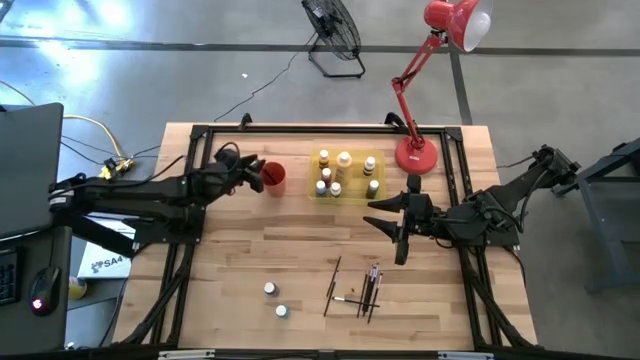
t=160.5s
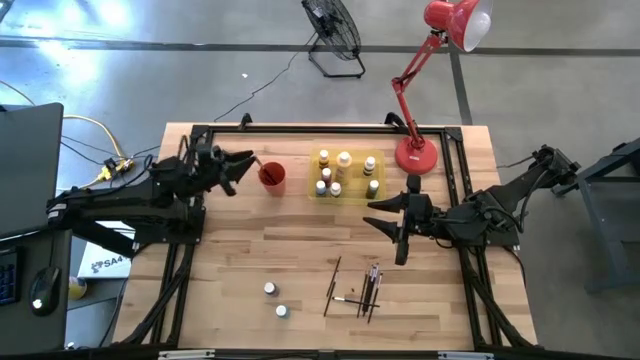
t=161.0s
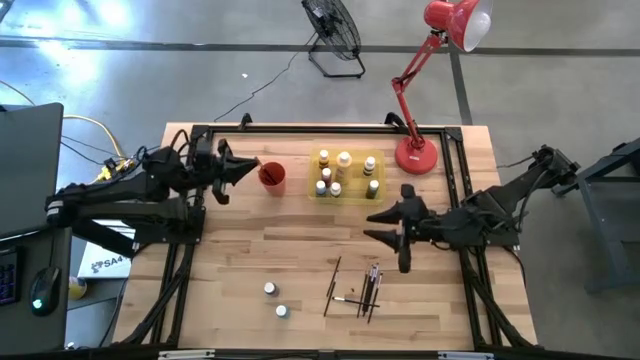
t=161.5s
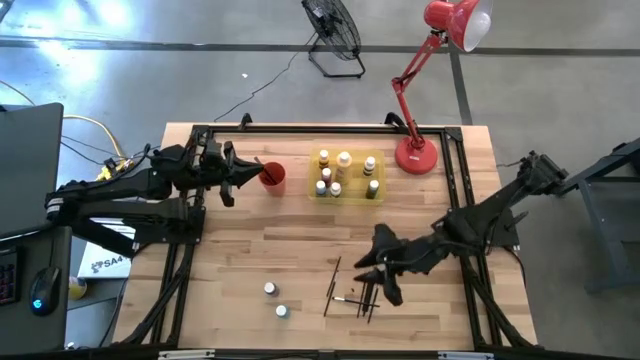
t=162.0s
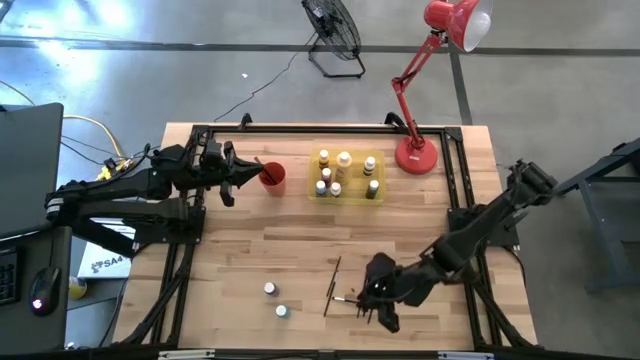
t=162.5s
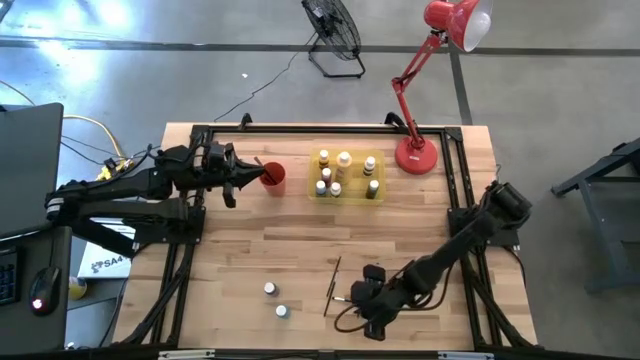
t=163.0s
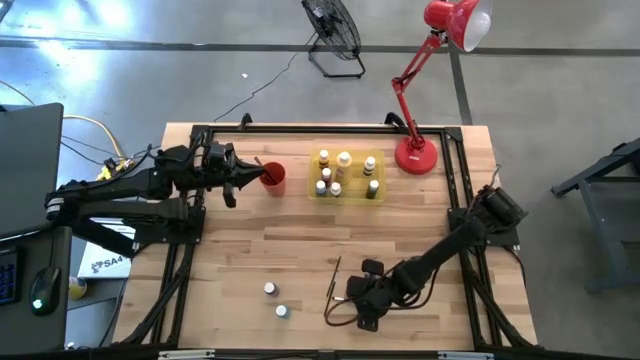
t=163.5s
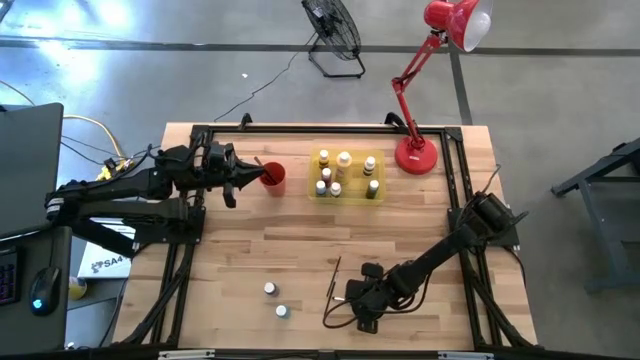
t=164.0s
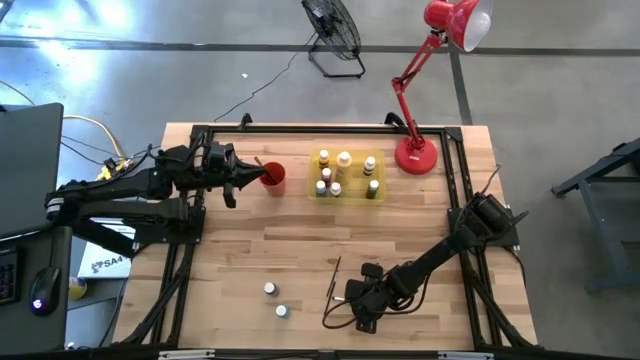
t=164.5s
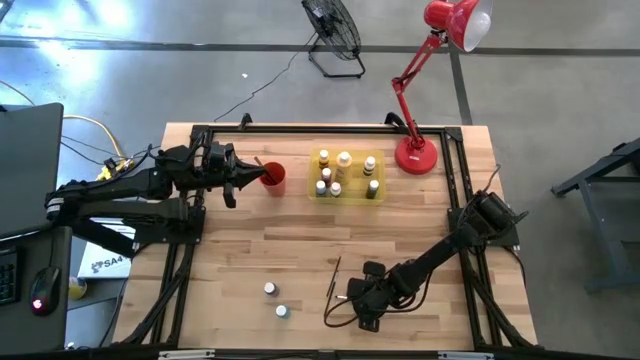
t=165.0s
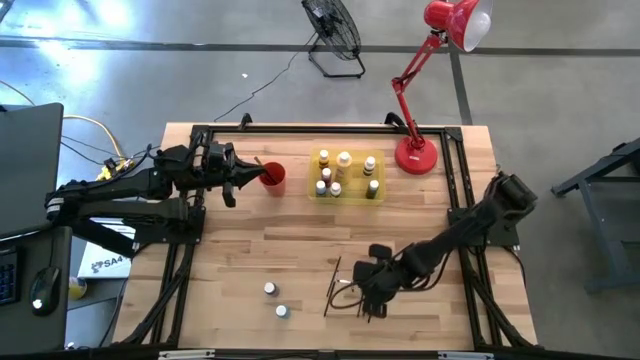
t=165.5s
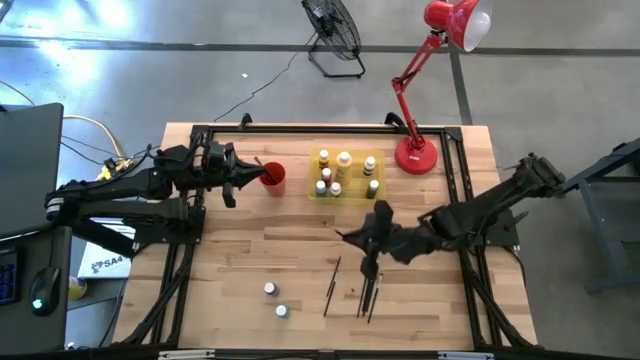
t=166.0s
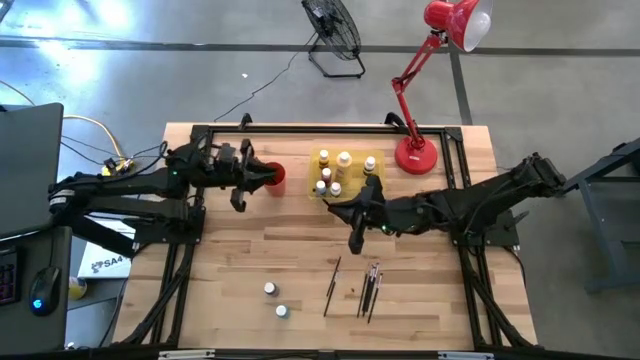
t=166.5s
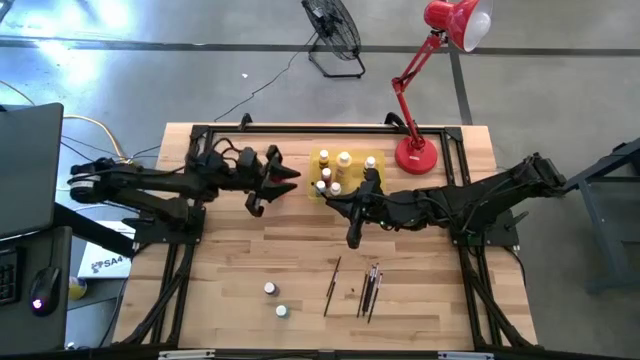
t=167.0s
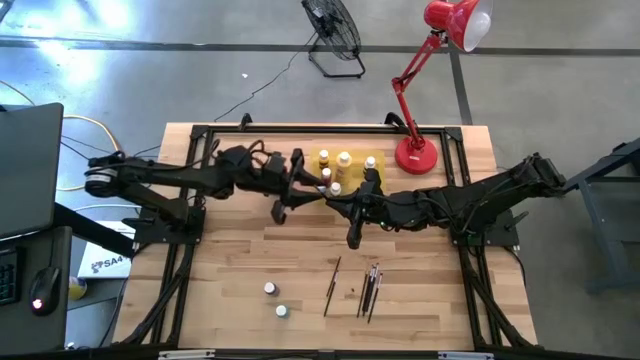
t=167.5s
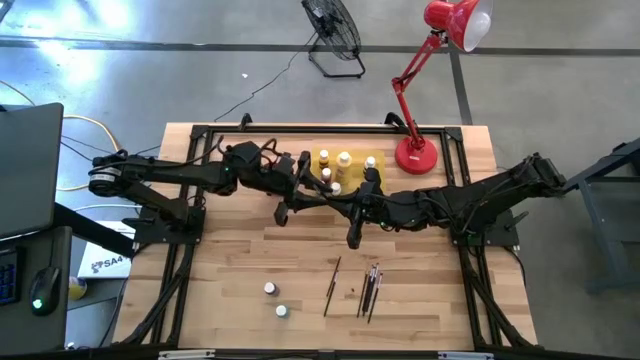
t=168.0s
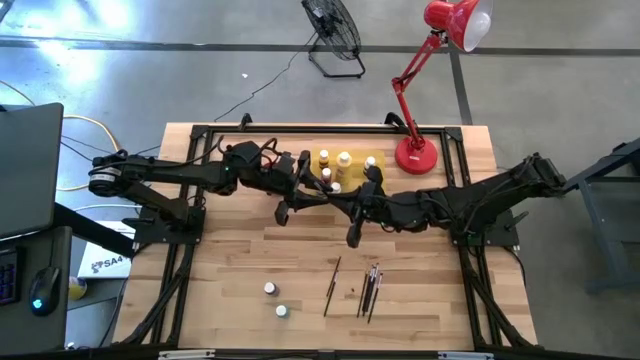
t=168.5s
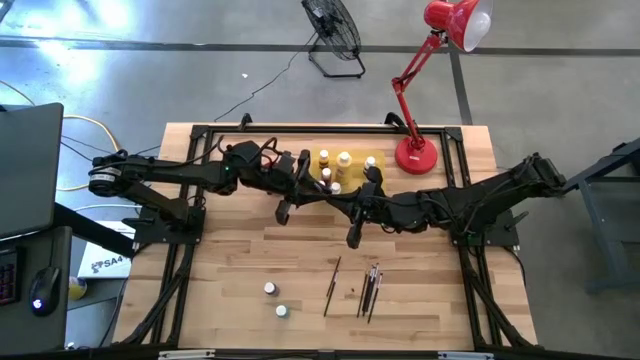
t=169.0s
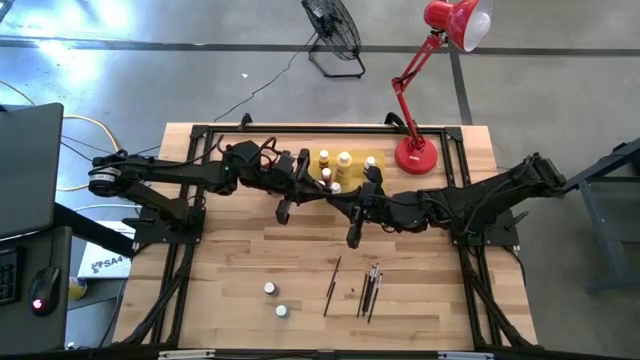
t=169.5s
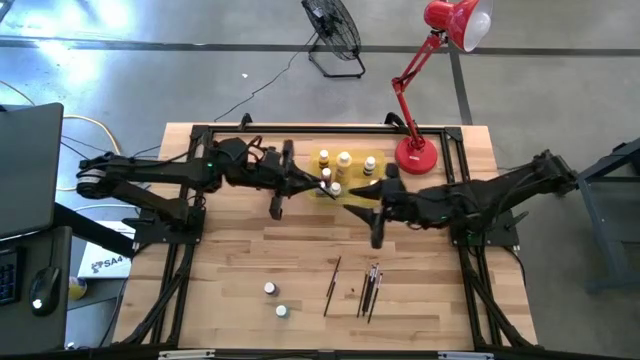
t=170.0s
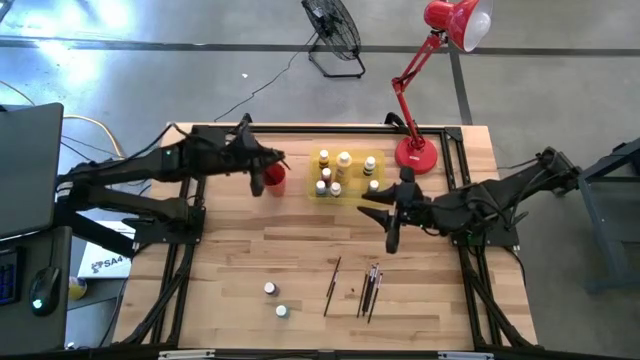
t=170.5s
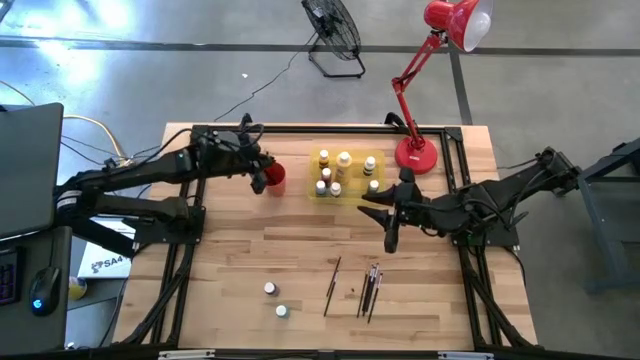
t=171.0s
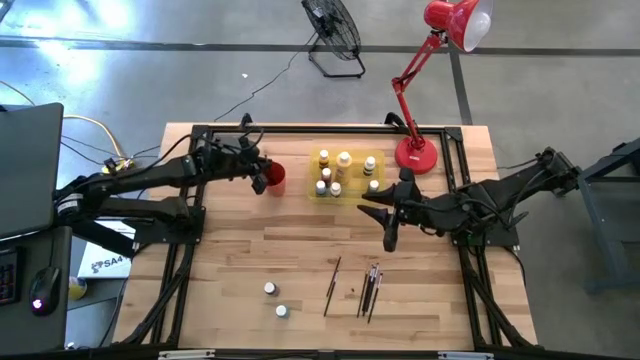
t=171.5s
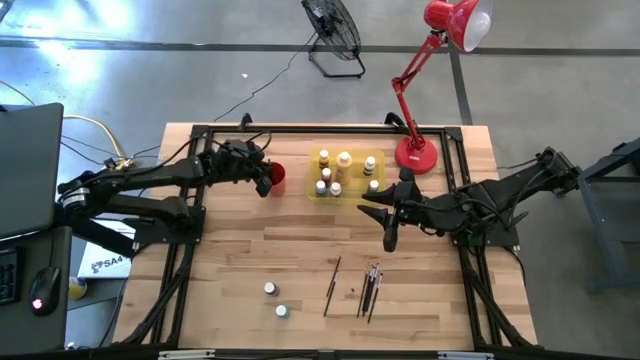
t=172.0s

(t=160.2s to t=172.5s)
Task: Pick & Place Paint Supplies
Put the silver paintbrush into the orange cup

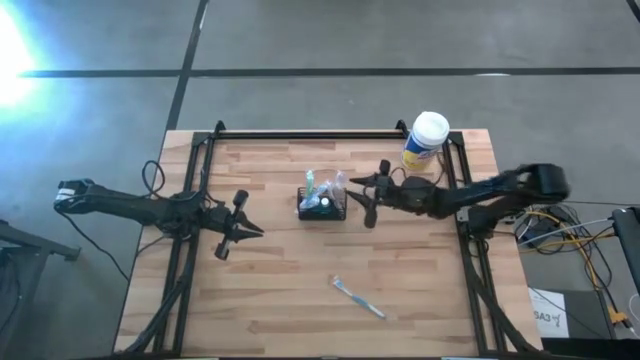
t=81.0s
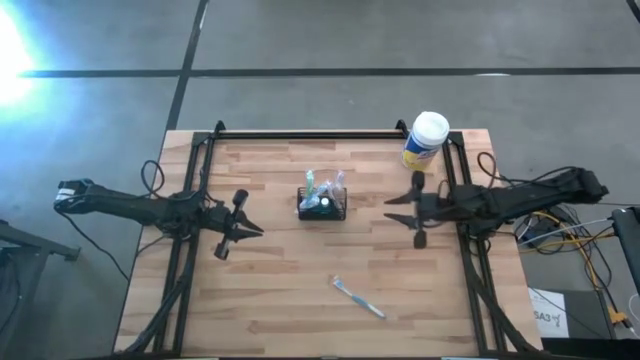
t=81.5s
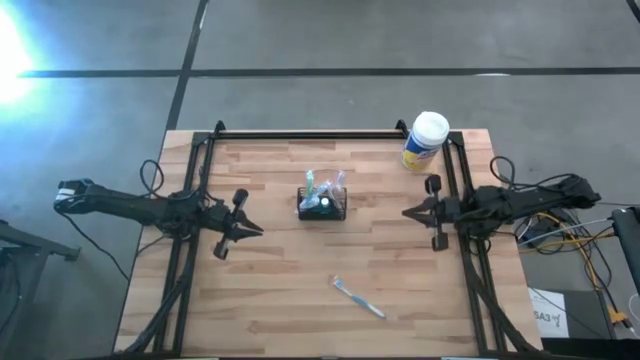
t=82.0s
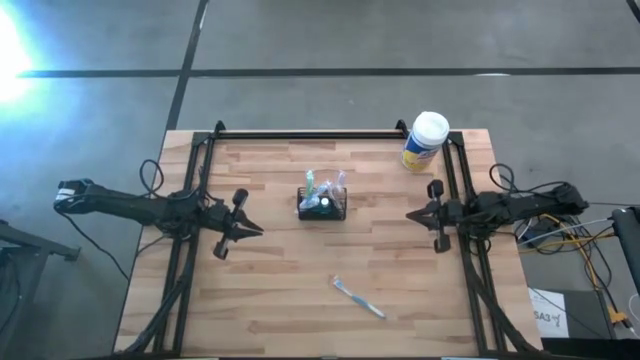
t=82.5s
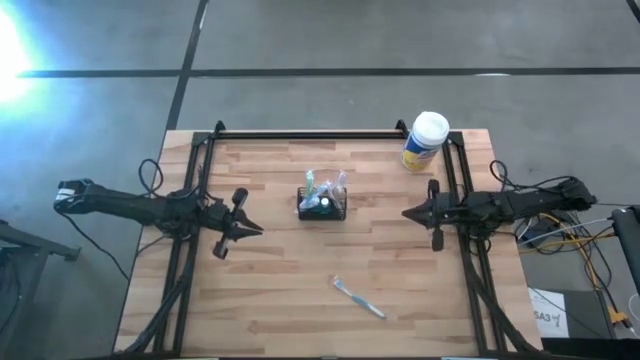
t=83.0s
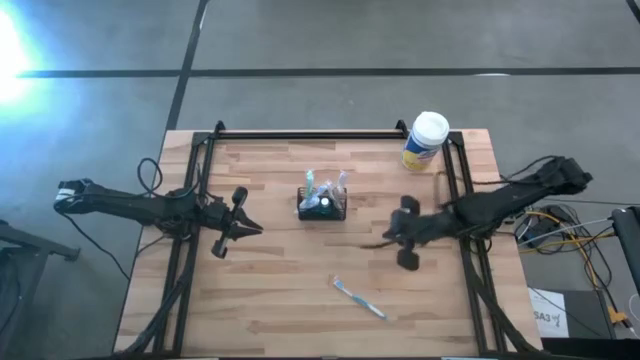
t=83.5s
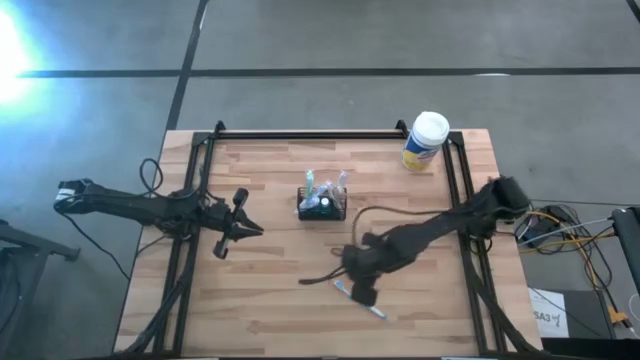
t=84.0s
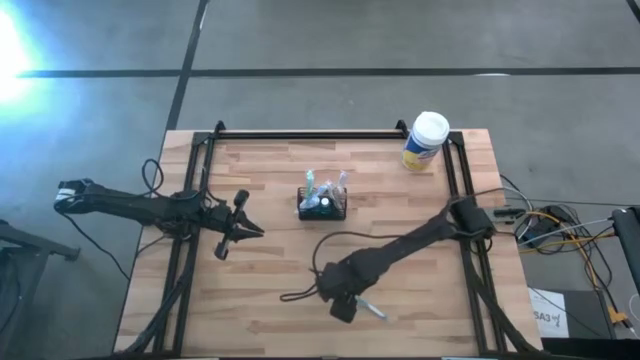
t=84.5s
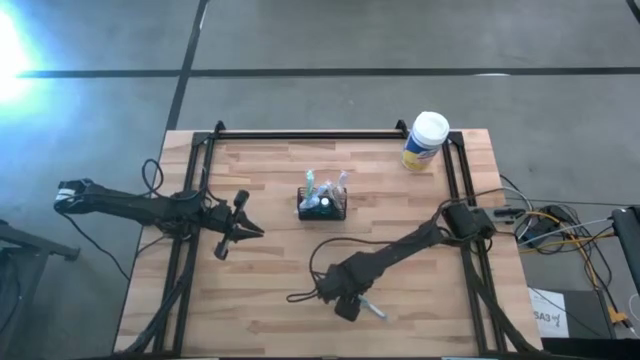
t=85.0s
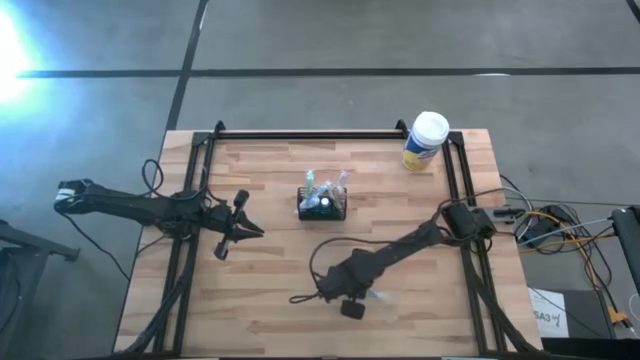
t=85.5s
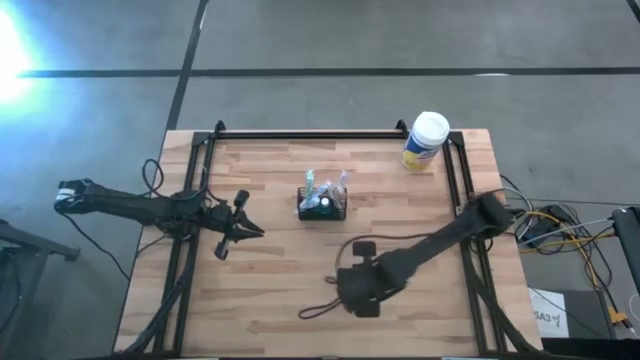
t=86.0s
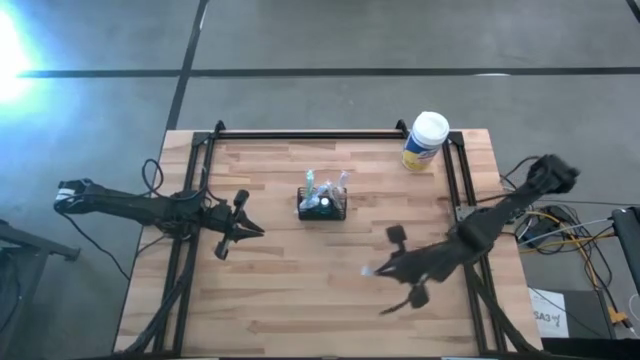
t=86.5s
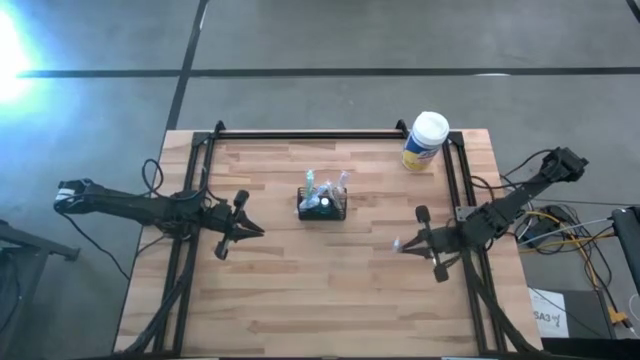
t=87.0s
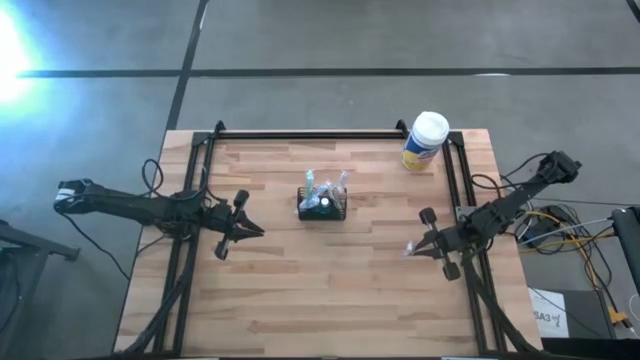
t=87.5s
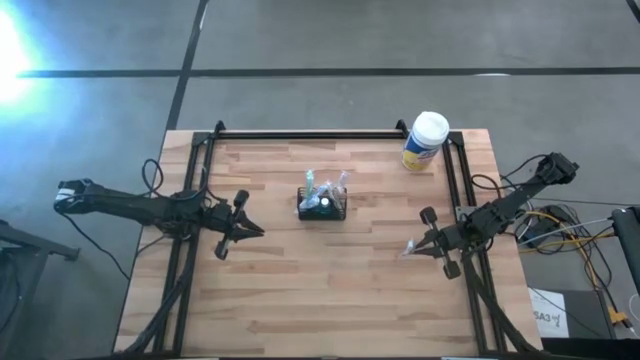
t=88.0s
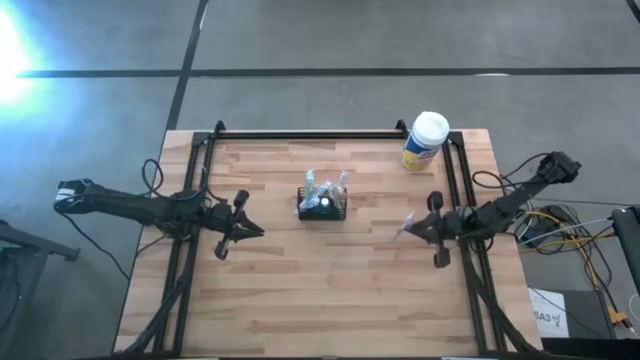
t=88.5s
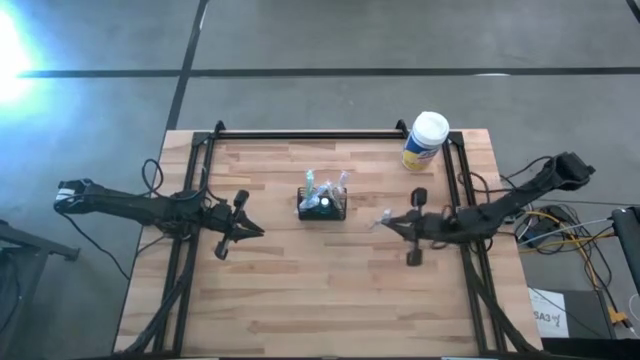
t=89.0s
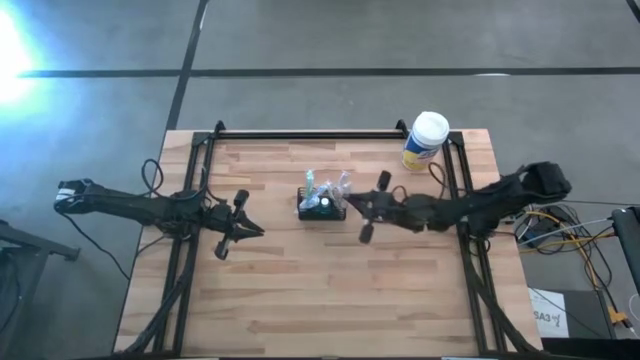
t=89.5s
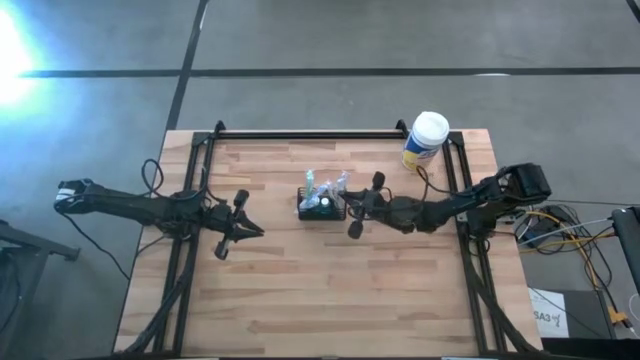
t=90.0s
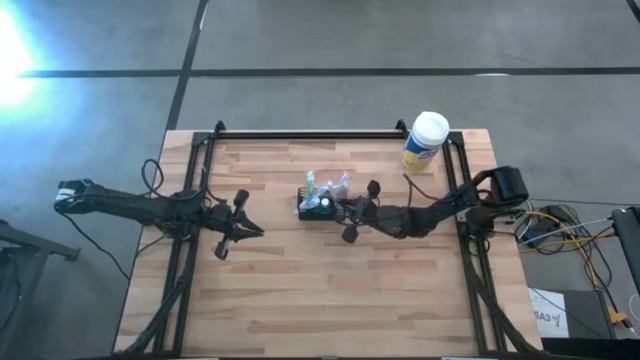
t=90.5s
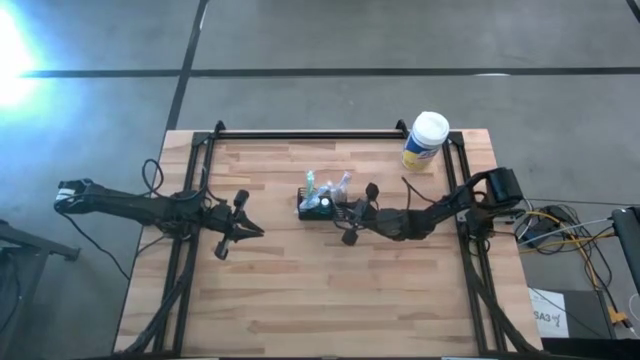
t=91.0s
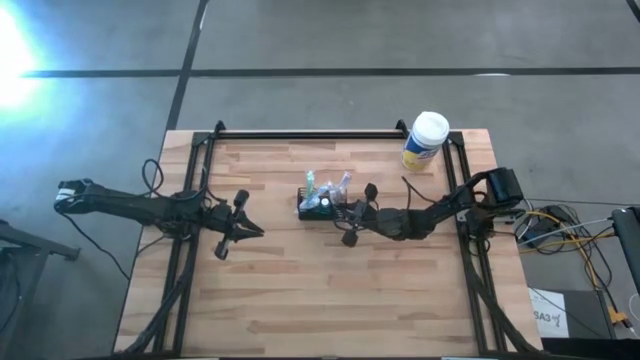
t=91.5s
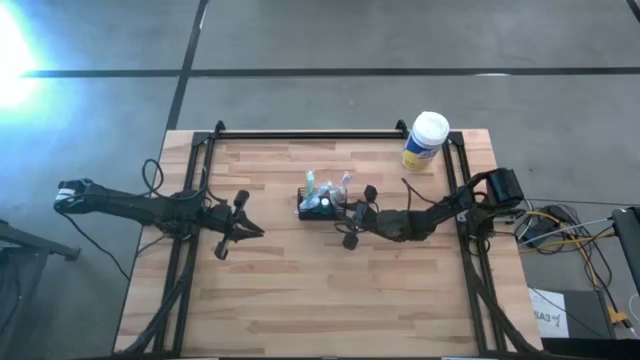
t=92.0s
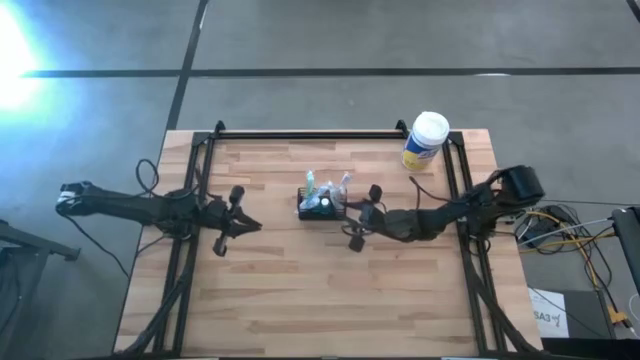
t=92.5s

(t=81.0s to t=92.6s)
Task: Pick & Place toothbrushing station
Put the blue toothbrush in the wire organizer
